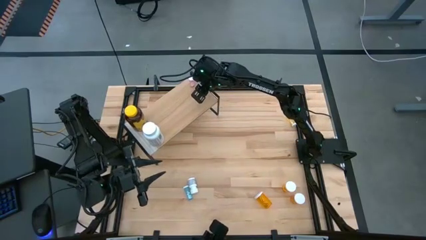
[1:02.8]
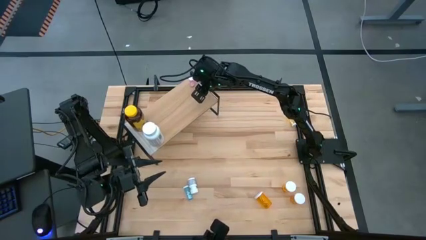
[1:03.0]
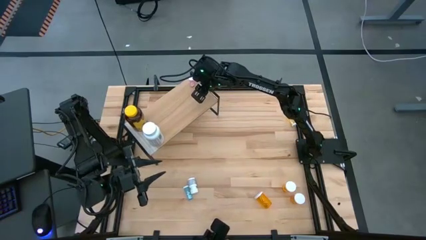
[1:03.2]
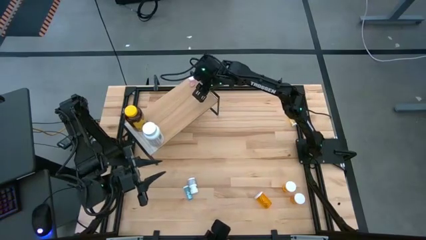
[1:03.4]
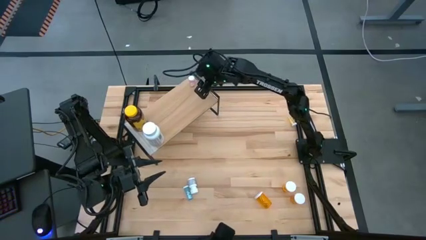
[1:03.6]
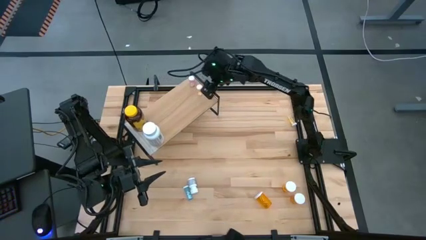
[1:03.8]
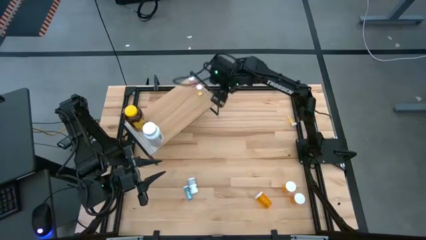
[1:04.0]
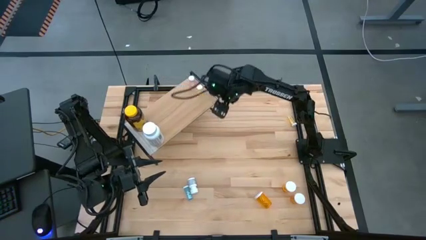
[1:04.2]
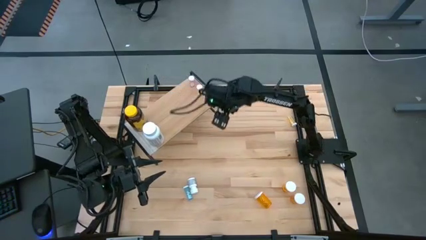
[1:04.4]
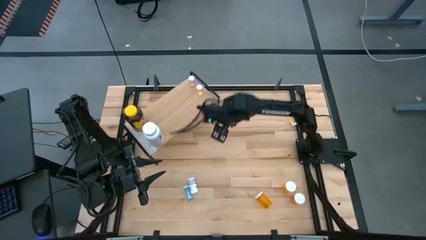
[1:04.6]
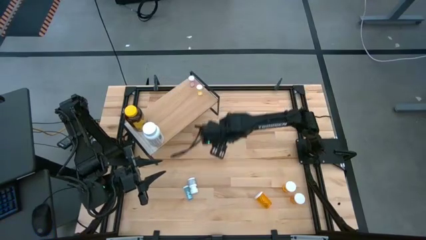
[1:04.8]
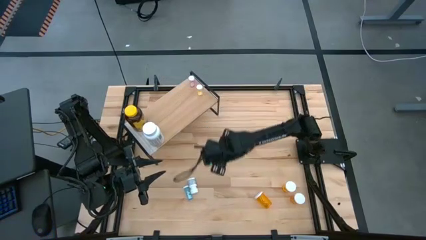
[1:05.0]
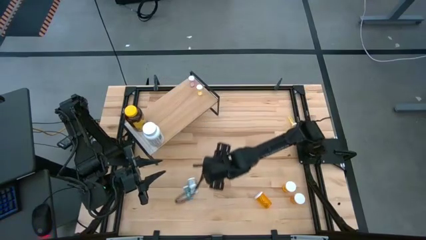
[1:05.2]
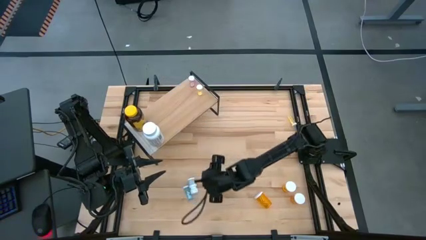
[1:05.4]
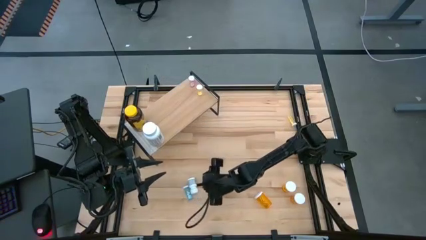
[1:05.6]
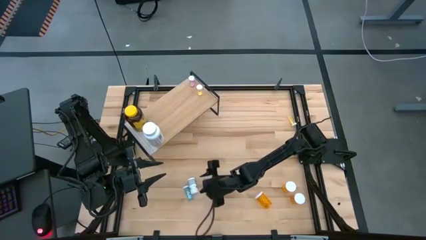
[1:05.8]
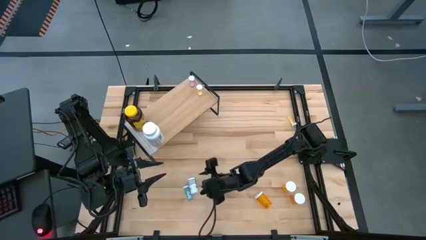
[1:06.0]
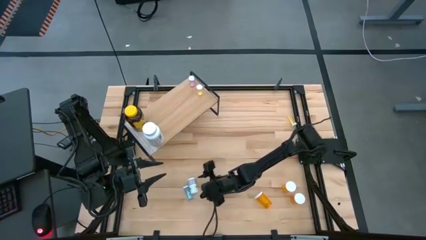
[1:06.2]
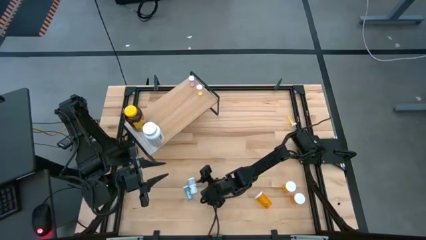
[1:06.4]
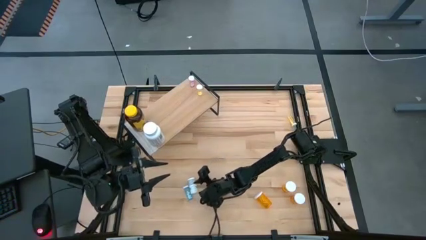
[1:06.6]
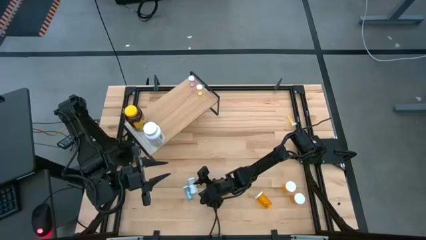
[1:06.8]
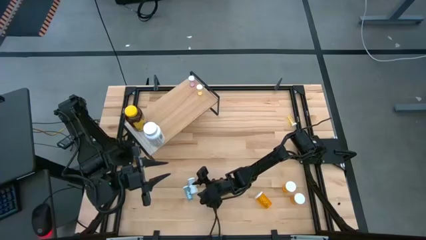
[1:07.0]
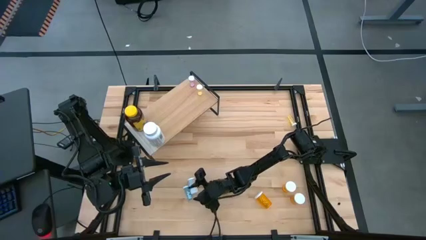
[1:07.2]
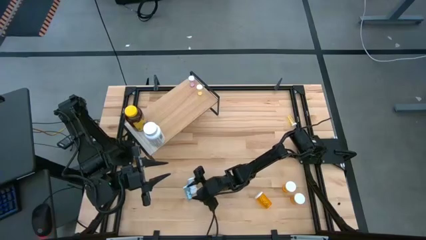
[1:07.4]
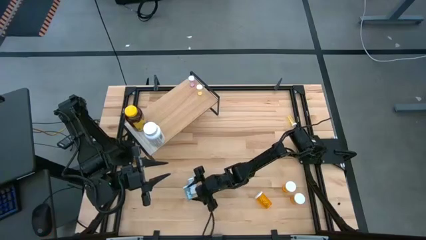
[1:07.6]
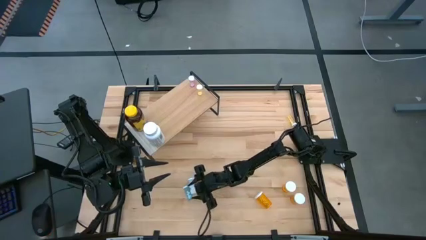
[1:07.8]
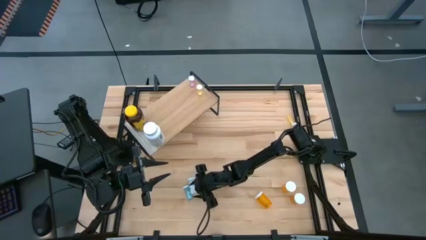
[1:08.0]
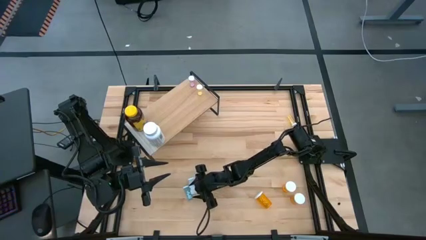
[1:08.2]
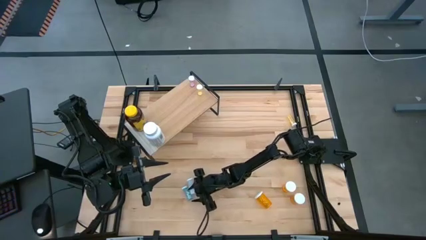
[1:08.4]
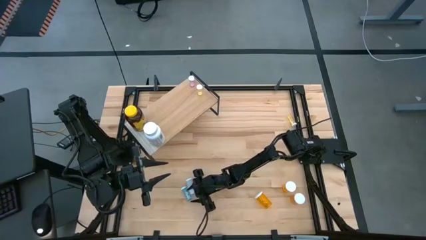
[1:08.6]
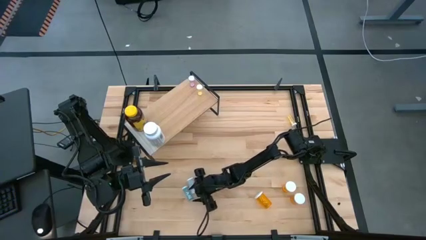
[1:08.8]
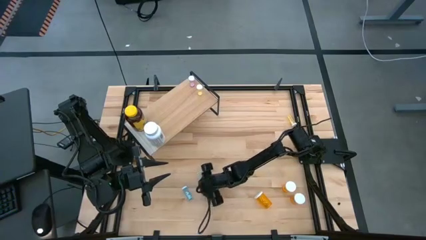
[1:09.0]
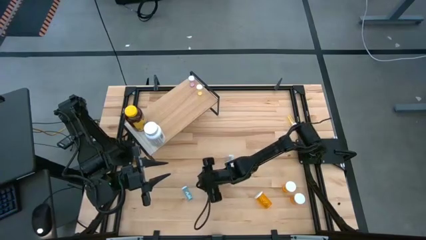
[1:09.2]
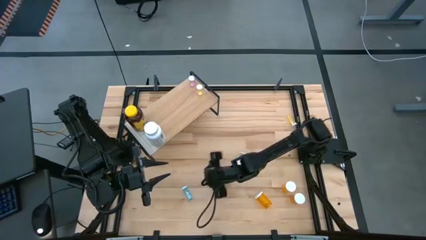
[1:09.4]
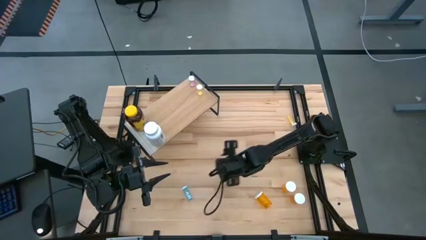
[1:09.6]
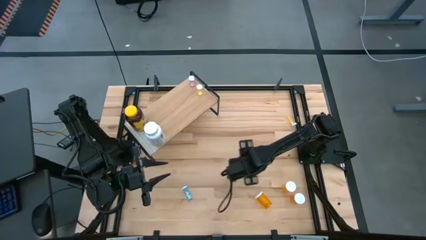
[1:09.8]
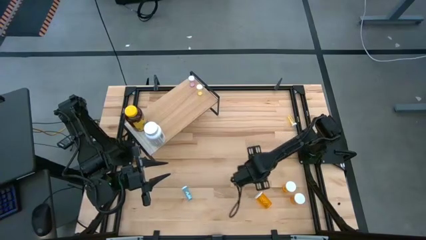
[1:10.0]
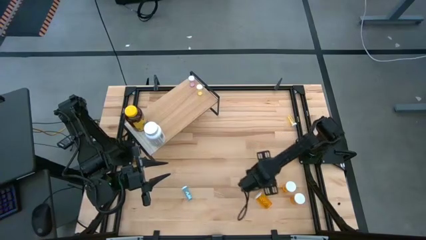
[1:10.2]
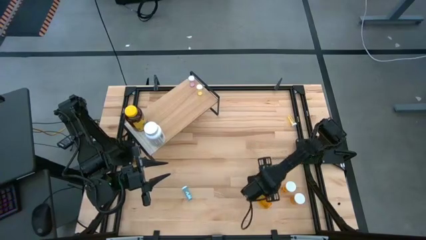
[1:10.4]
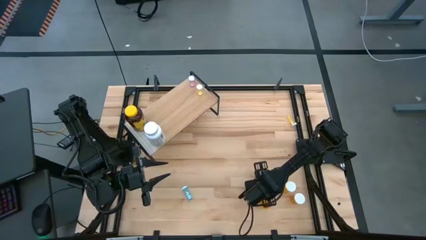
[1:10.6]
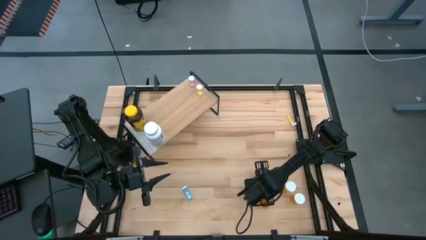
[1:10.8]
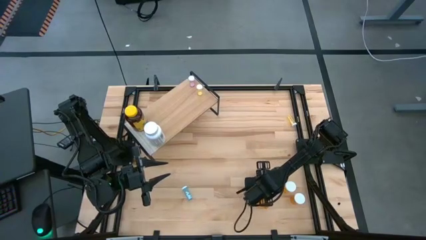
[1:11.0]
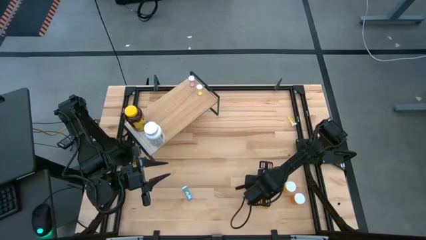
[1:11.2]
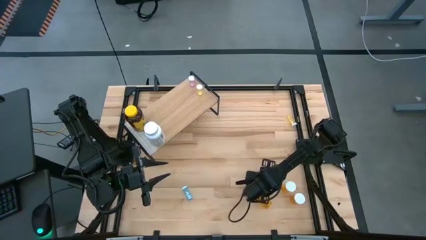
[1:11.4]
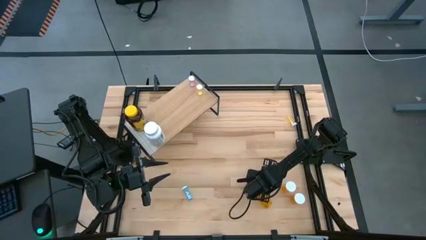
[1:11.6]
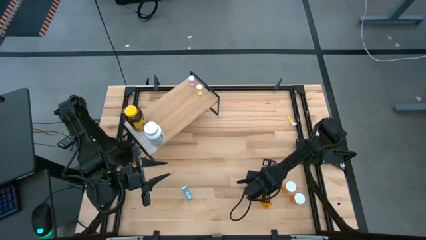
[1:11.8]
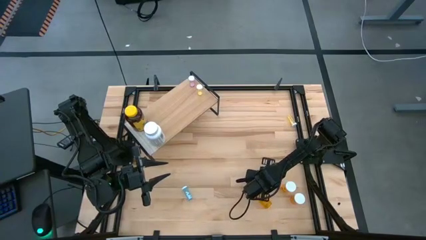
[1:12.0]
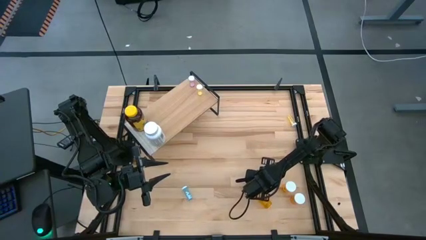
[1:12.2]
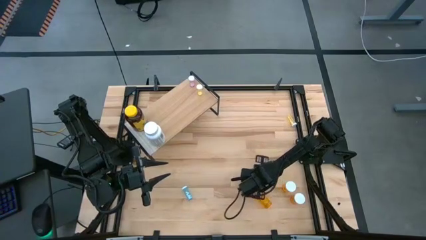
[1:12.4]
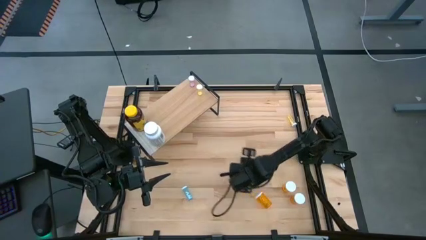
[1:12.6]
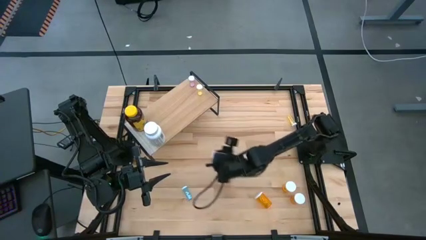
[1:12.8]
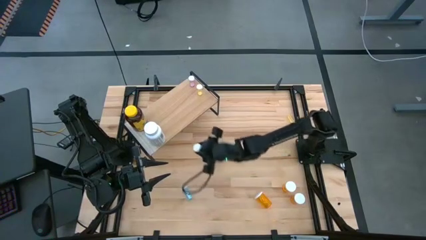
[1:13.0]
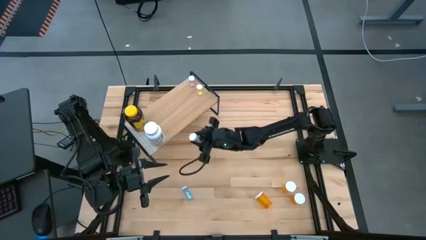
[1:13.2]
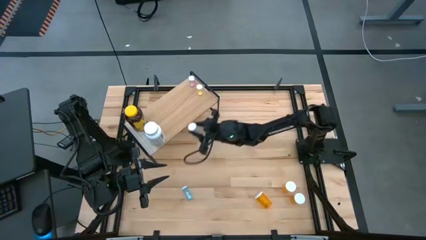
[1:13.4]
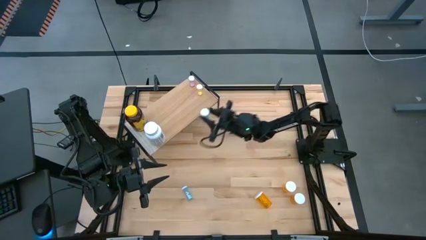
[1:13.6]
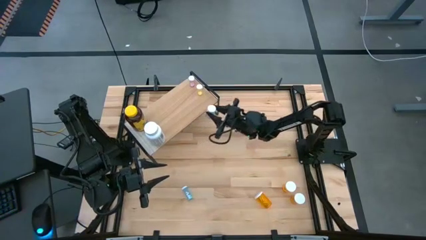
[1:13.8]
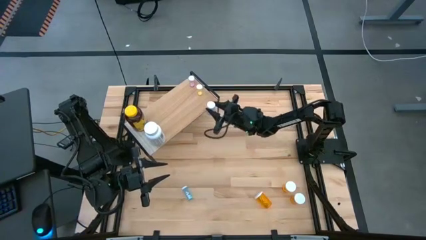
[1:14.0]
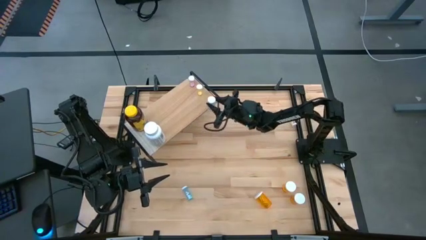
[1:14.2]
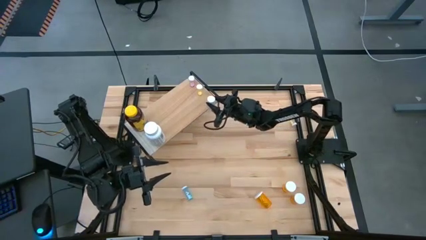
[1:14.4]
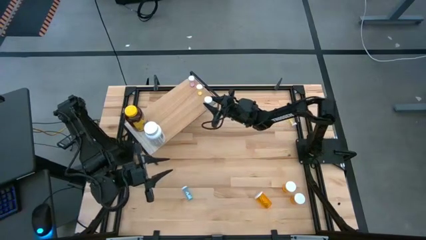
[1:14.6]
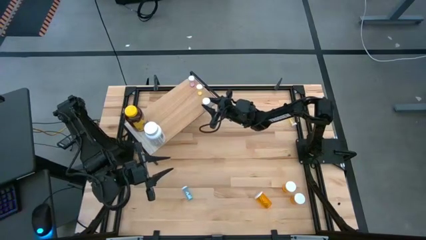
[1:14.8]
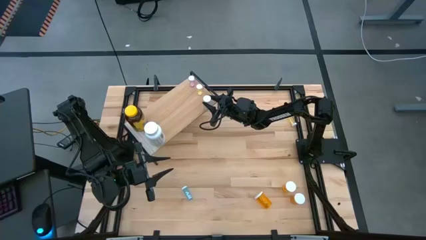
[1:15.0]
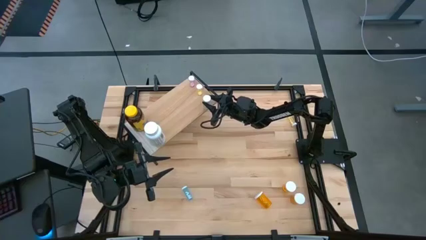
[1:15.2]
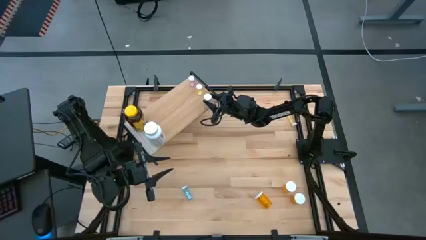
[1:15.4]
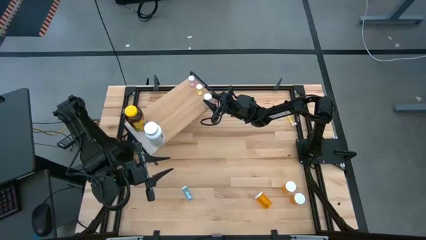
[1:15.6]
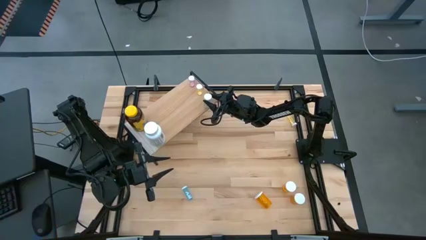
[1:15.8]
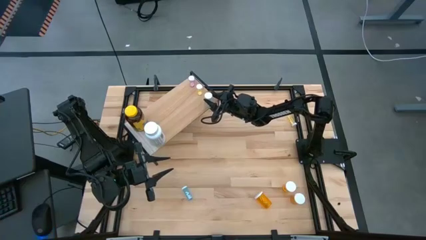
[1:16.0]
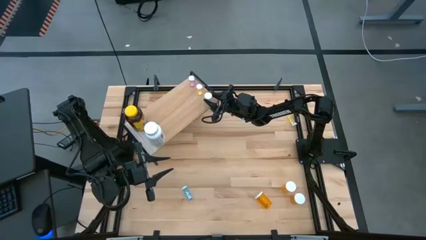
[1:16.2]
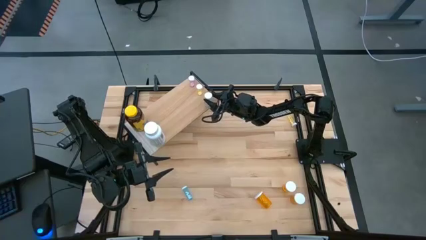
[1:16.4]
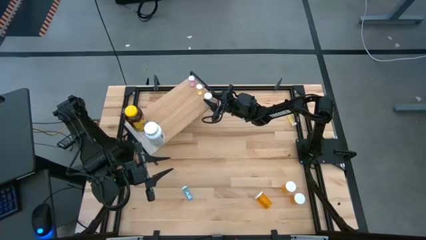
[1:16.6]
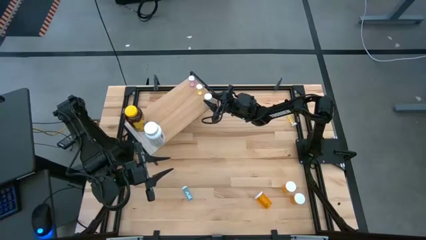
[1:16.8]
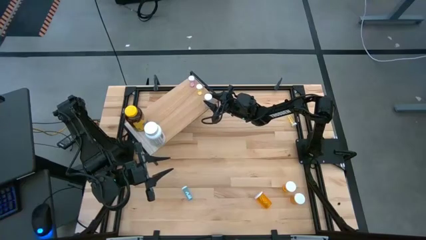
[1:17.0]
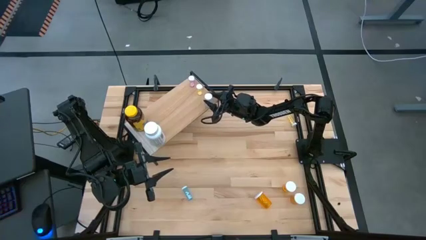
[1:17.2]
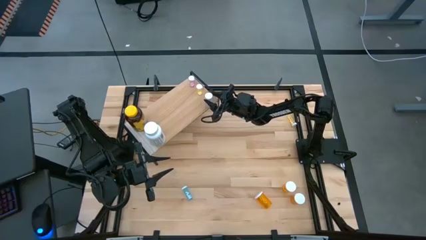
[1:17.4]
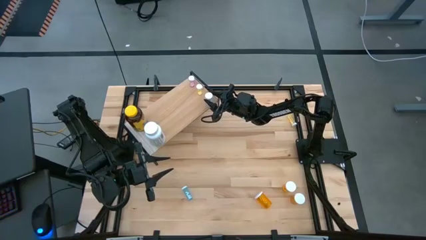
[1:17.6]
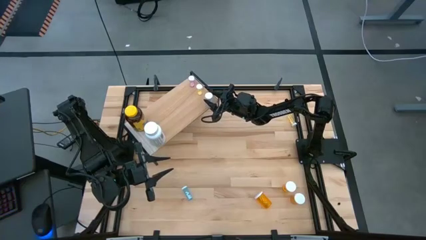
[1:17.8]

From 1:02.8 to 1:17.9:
Task: Pick and place medicine bottles onto shelf by color
Put the small white pill bottle on the shelf
